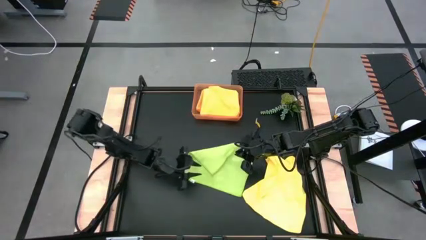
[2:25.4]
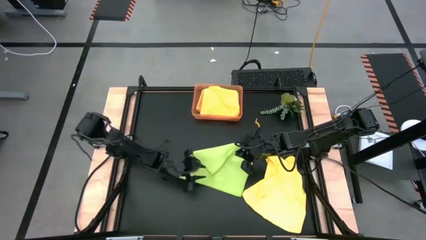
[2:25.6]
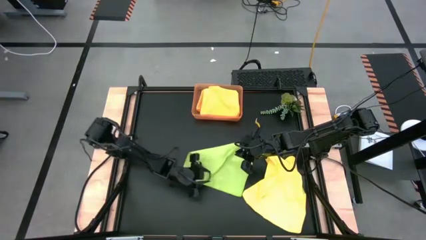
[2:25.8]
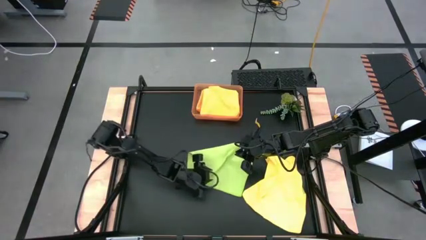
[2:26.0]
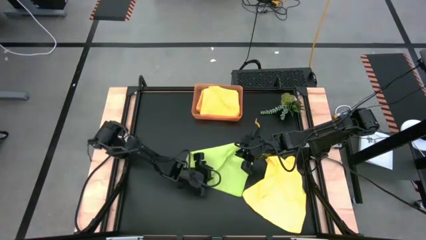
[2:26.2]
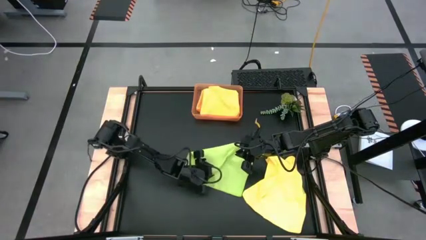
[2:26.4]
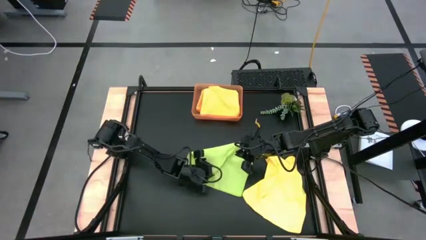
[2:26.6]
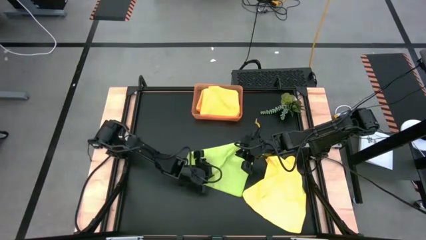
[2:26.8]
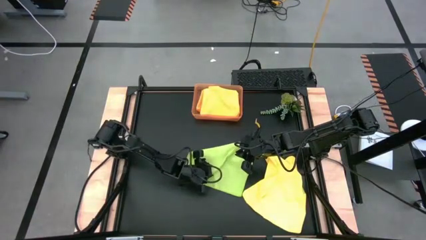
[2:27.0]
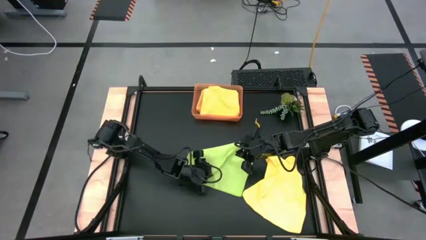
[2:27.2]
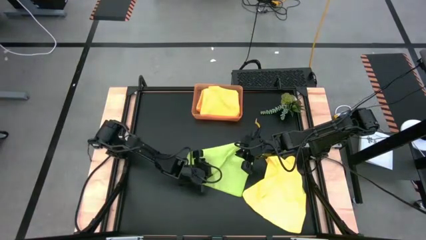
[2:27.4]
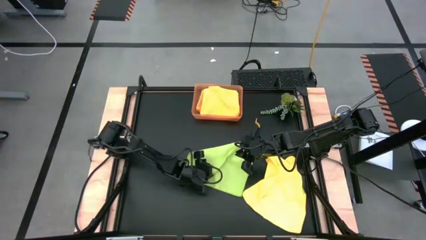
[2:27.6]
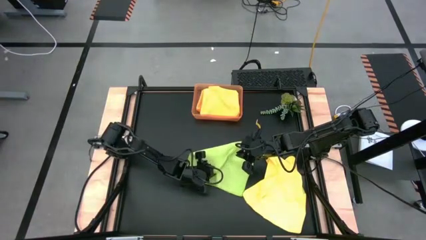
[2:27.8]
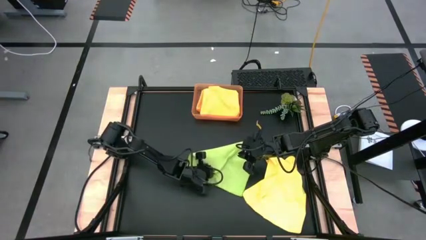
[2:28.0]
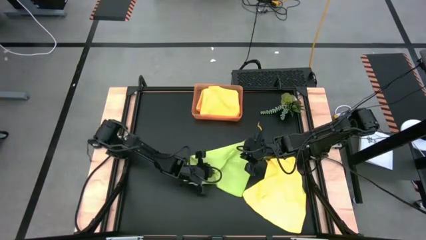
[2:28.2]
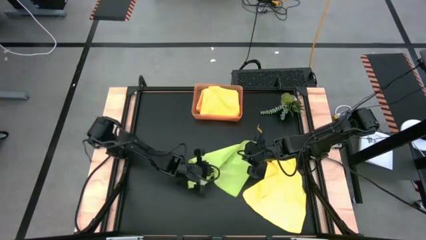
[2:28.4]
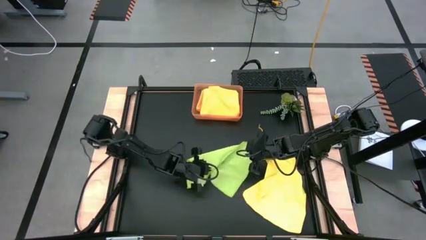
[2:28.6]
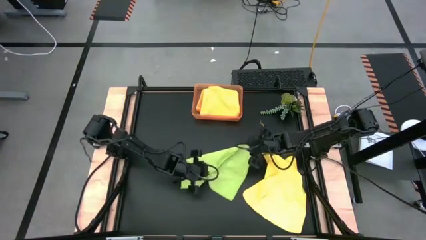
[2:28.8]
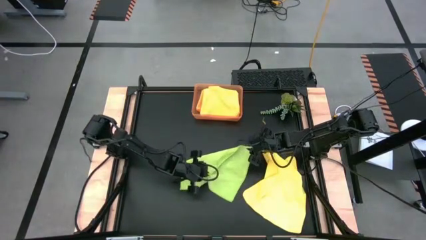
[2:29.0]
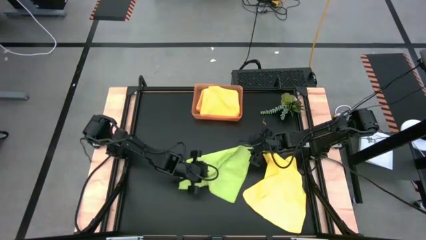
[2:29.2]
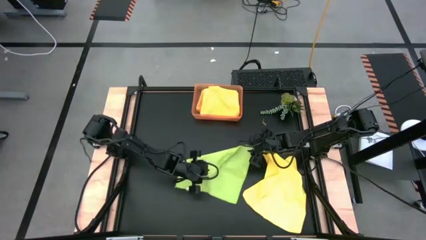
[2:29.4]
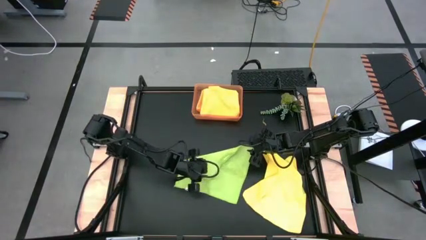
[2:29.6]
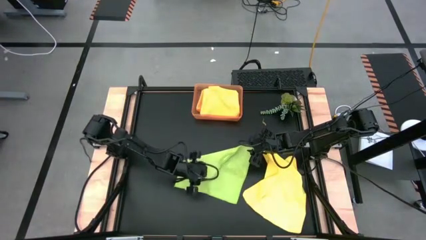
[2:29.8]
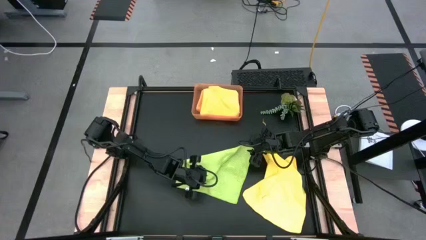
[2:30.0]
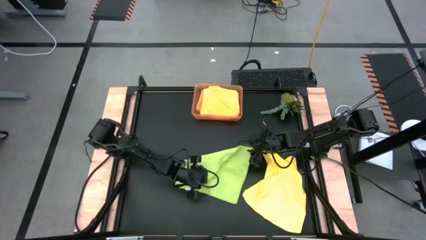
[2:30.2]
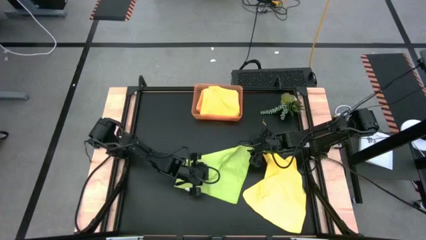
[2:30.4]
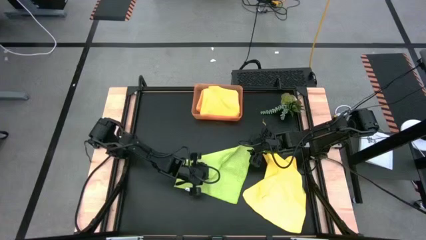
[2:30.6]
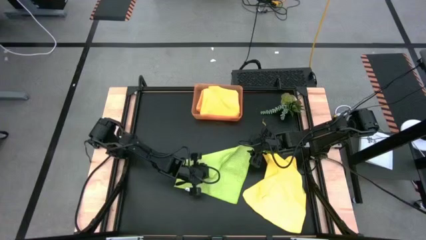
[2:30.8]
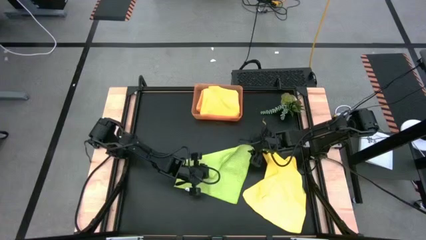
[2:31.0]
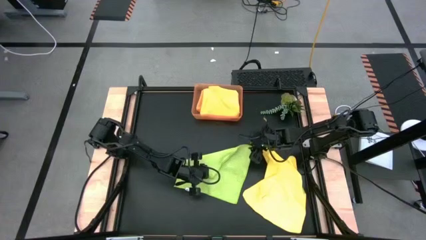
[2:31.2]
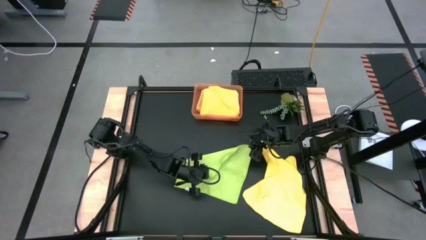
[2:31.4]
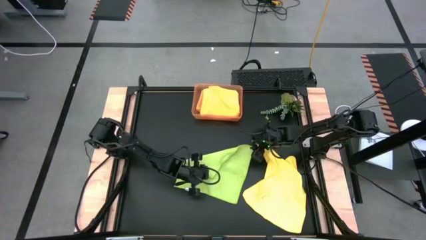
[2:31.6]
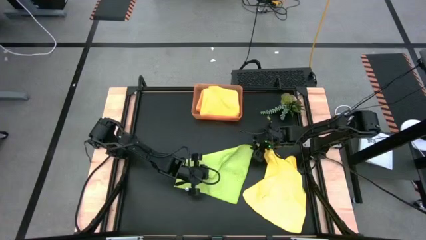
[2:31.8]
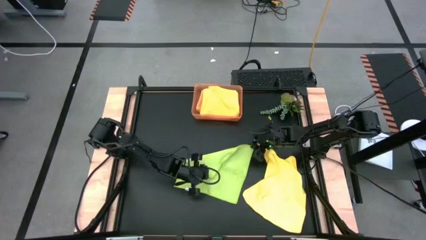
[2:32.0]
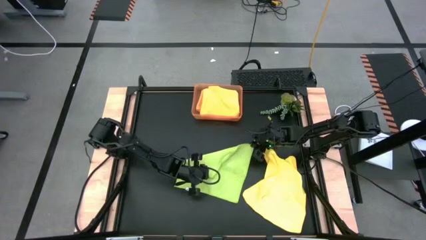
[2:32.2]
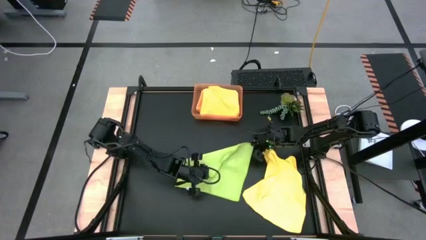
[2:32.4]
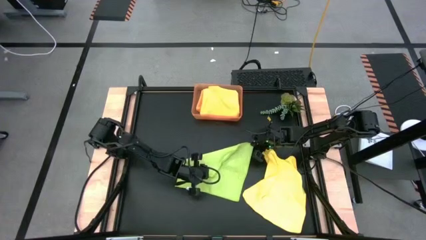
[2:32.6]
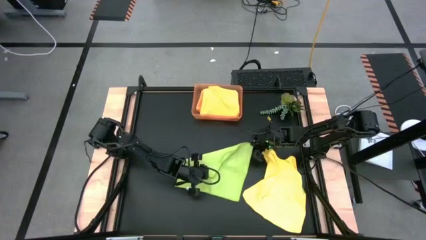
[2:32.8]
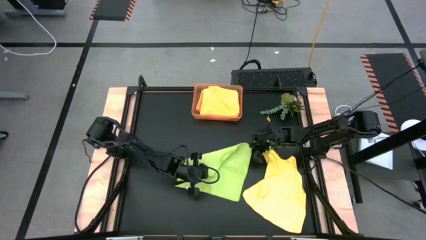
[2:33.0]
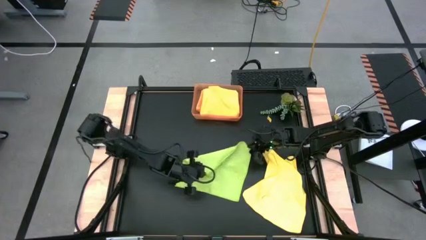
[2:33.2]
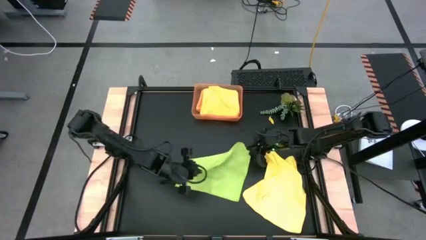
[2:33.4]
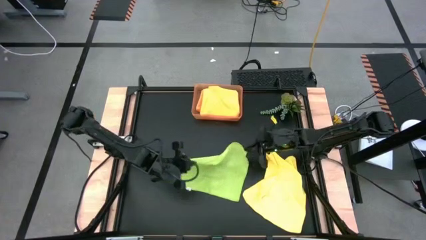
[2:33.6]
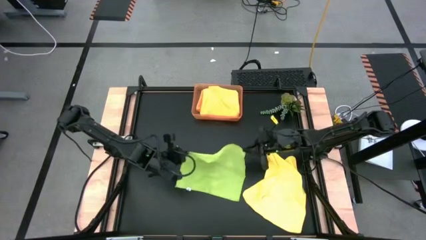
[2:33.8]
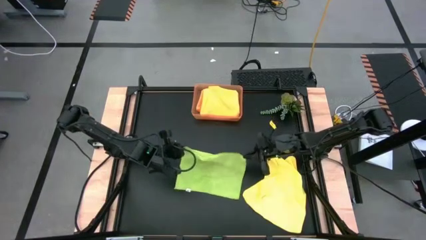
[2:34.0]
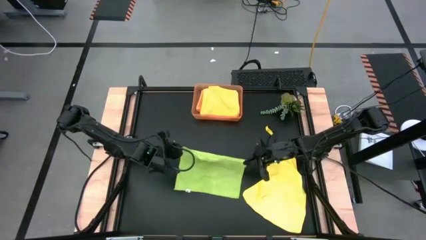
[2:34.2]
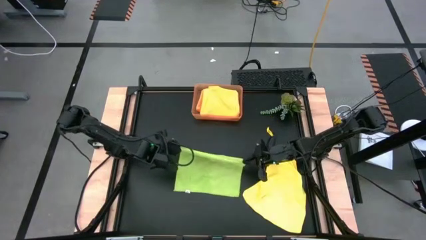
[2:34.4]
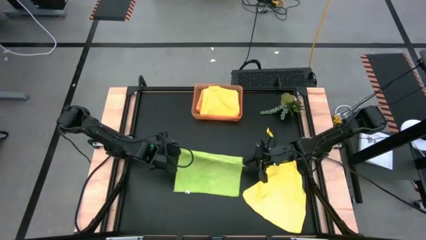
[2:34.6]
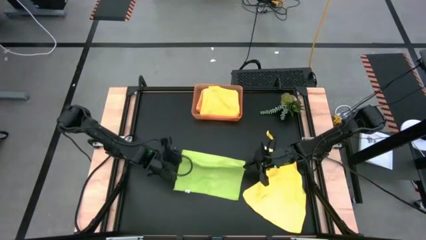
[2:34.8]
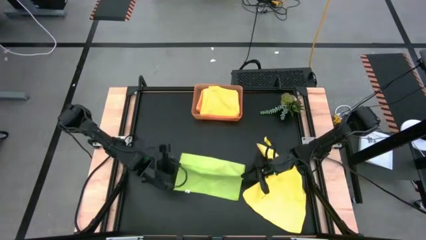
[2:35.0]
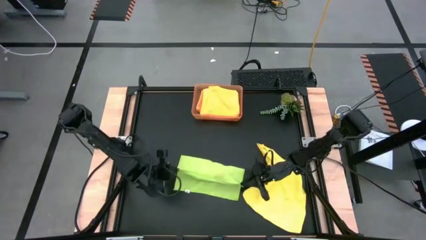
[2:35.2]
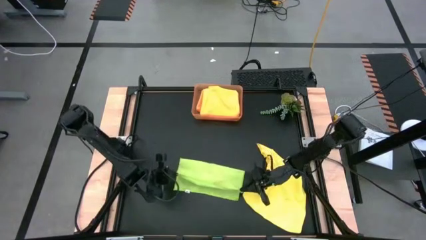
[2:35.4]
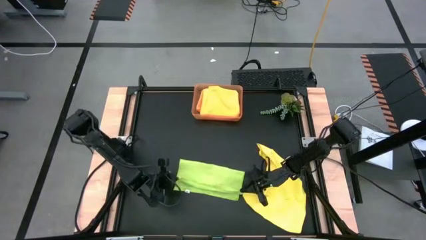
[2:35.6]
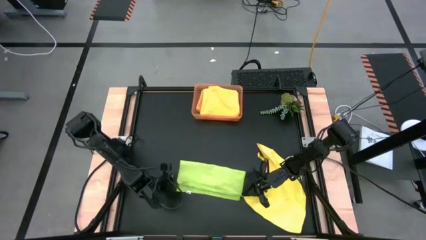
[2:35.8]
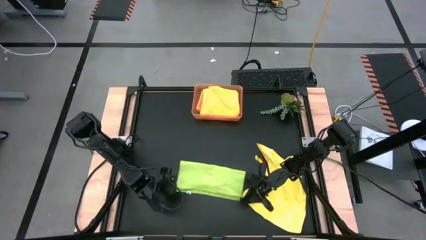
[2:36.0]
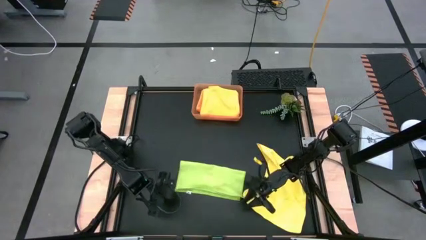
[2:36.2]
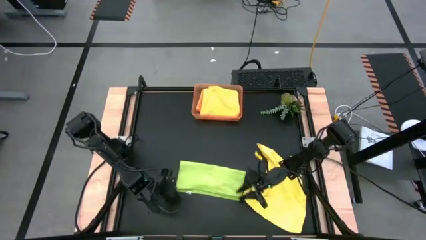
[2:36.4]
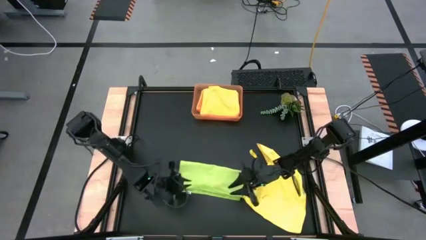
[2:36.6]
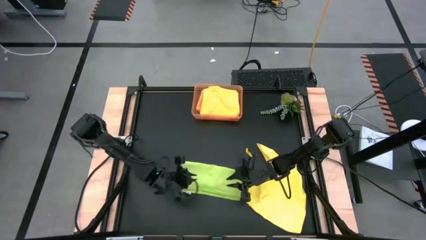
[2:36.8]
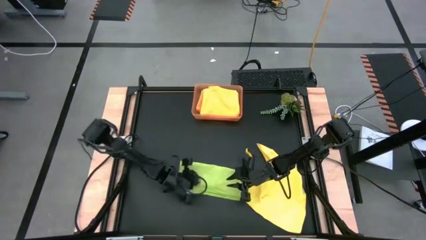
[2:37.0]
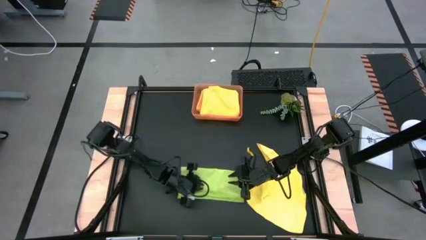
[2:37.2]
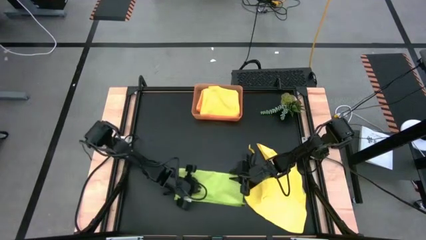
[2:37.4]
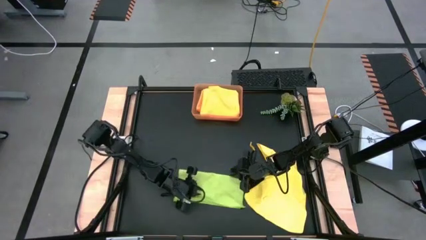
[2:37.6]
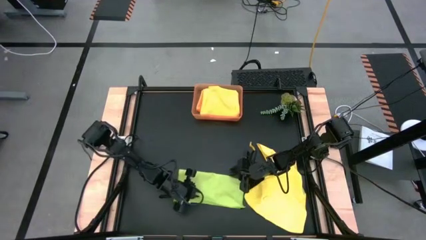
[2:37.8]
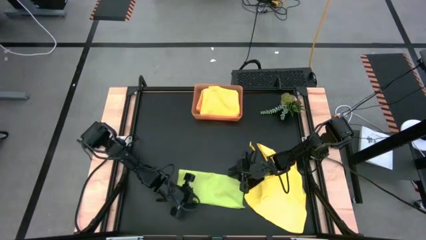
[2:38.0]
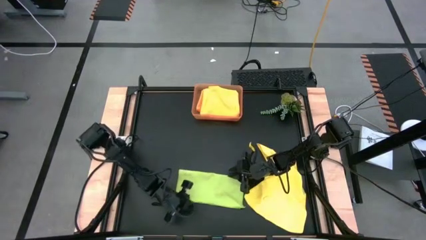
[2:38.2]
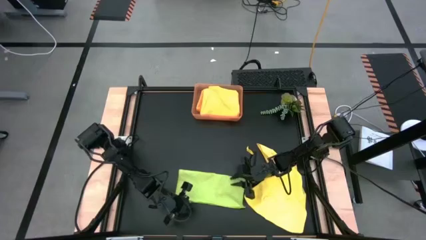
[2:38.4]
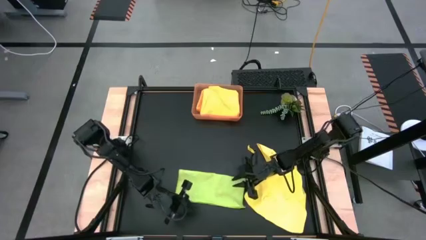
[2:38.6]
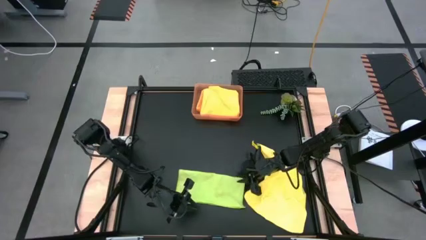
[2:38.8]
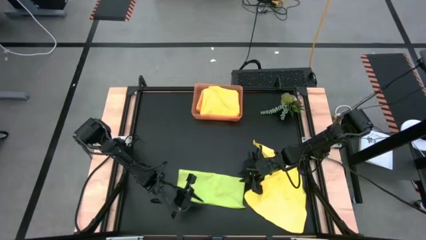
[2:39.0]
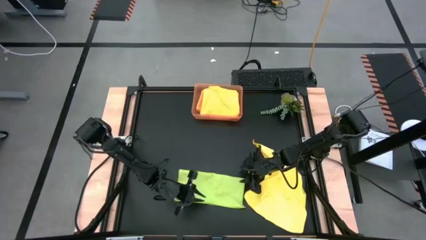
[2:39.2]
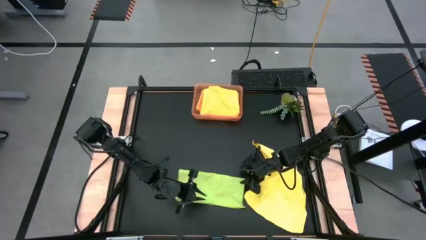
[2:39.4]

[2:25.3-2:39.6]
Task: Fold microfiber towels
Fold the green towel
